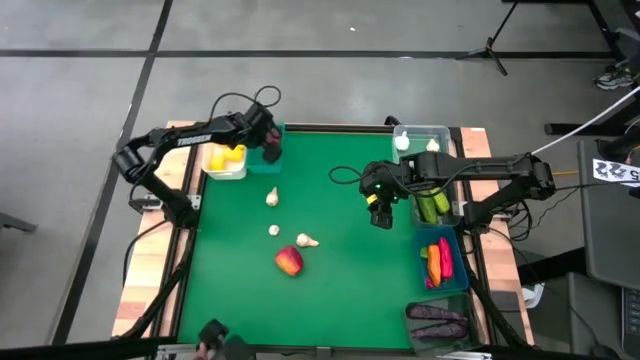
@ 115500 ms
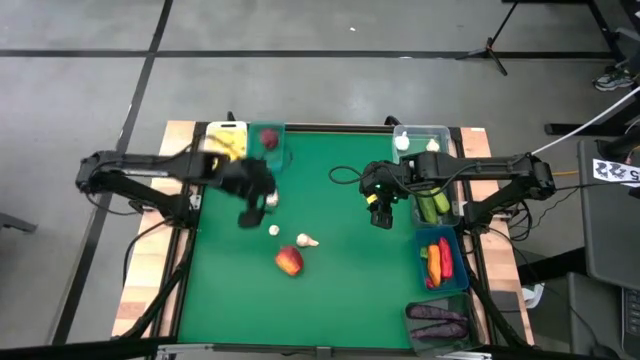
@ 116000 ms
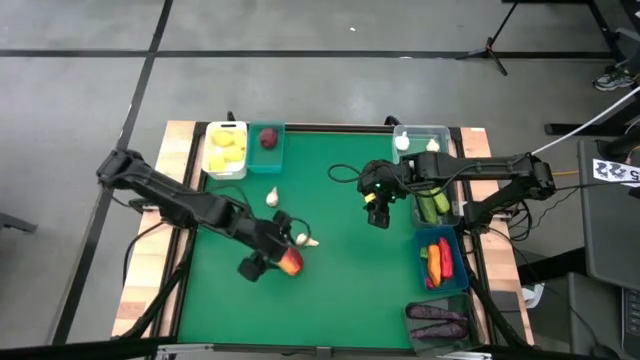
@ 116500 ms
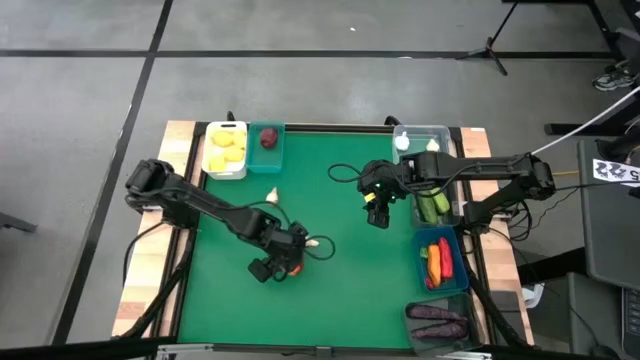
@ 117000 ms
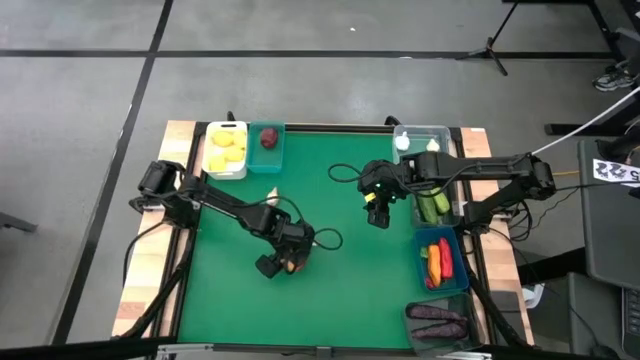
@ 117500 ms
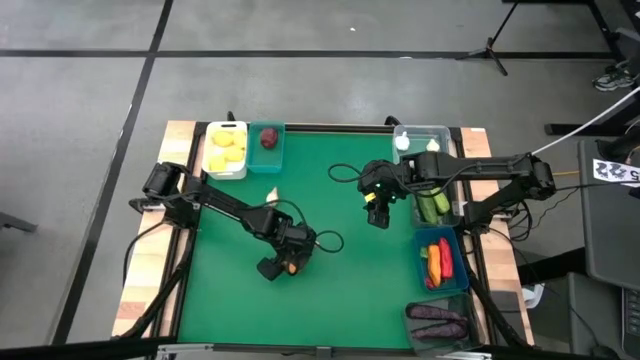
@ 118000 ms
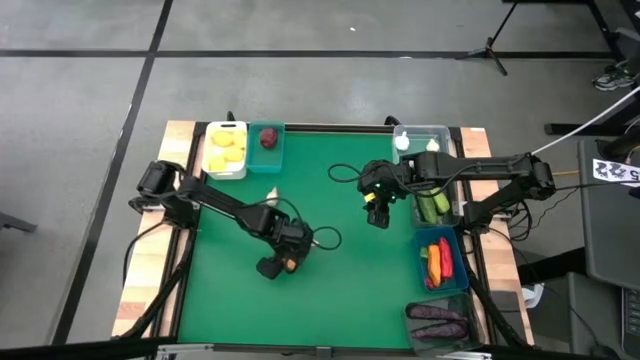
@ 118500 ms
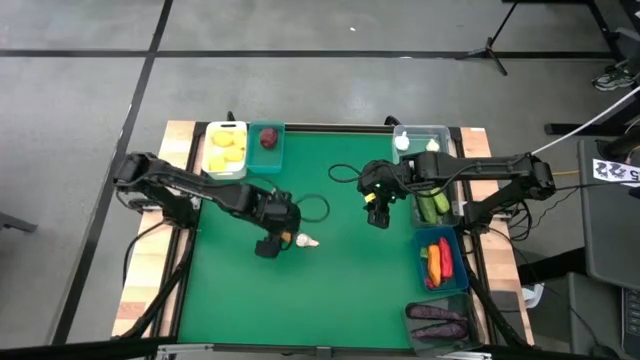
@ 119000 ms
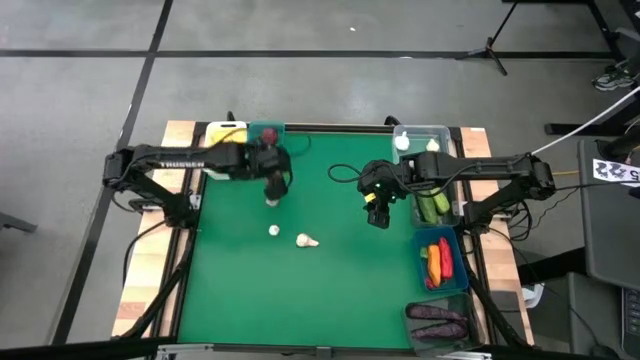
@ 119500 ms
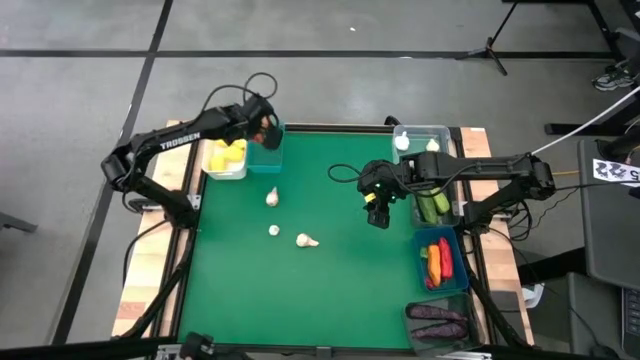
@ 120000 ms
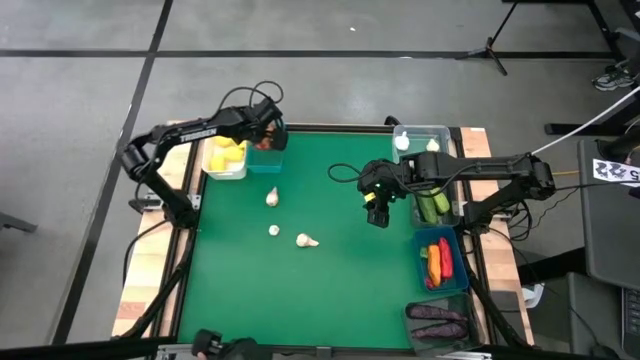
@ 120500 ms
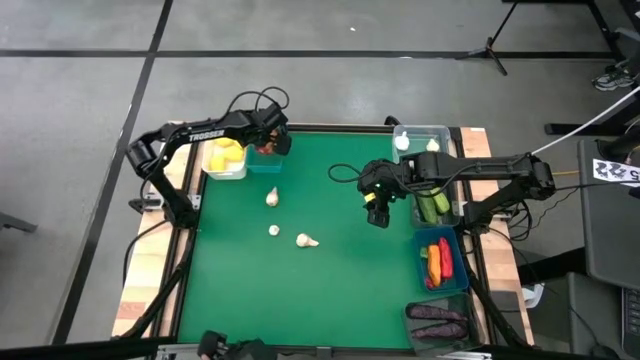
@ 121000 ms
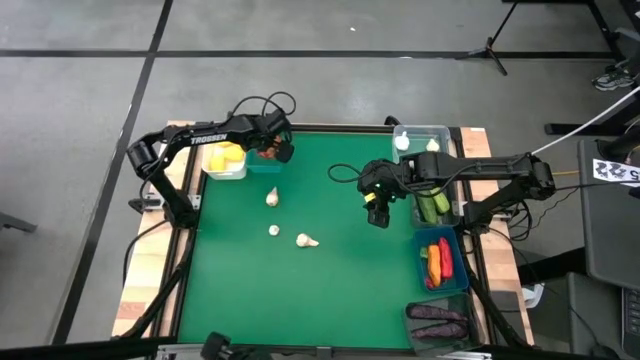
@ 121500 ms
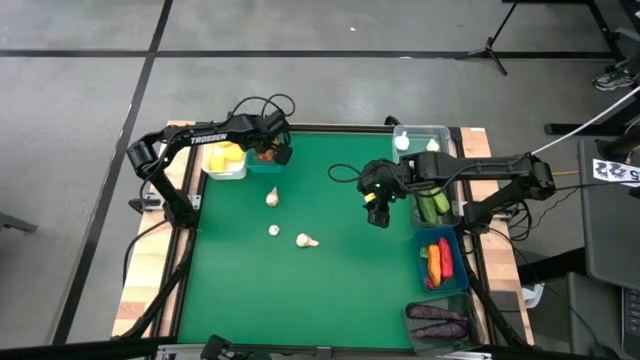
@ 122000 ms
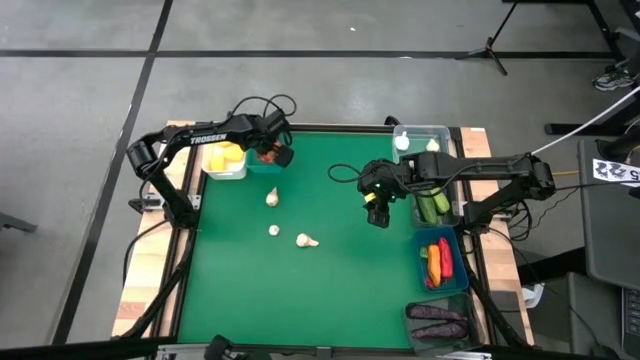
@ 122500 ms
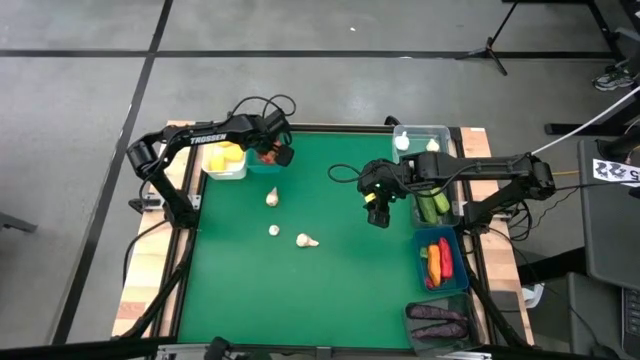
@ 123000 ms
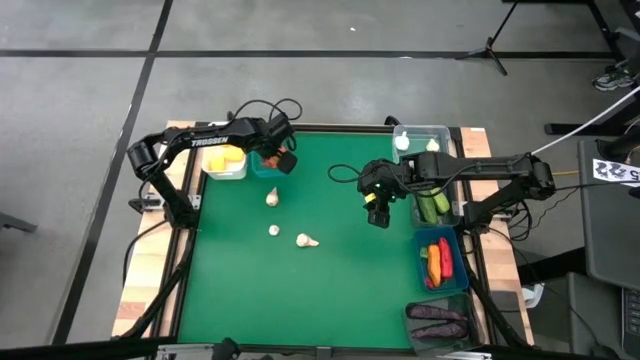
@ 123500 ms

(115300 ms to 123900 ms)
Task: Sort produce into baskets
Put the red apple into the blue bin

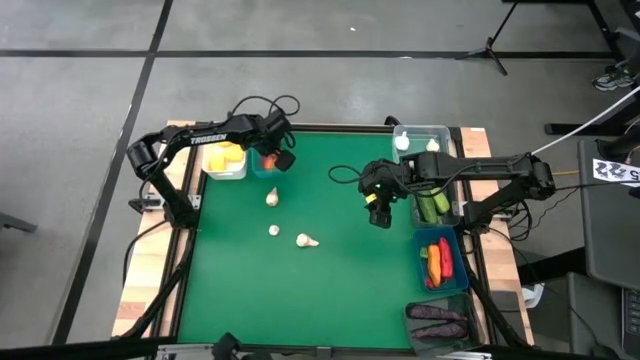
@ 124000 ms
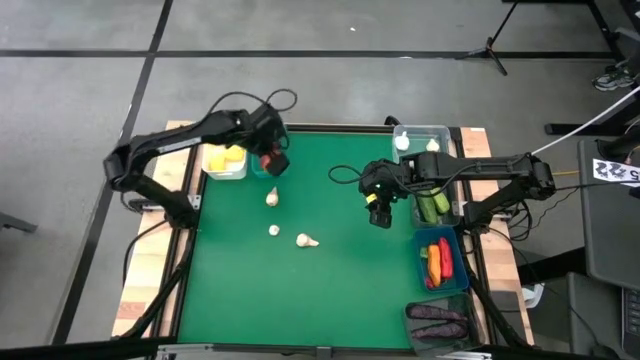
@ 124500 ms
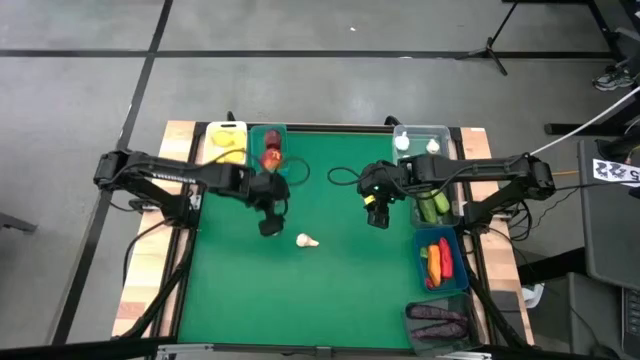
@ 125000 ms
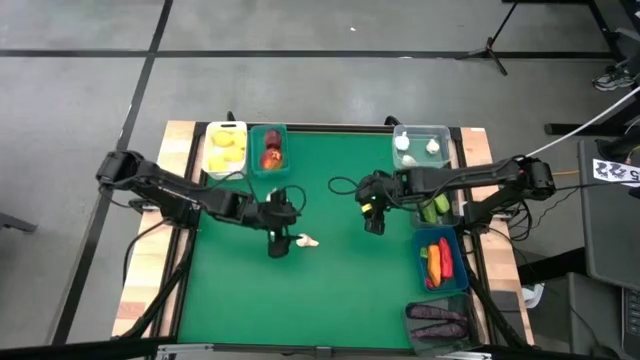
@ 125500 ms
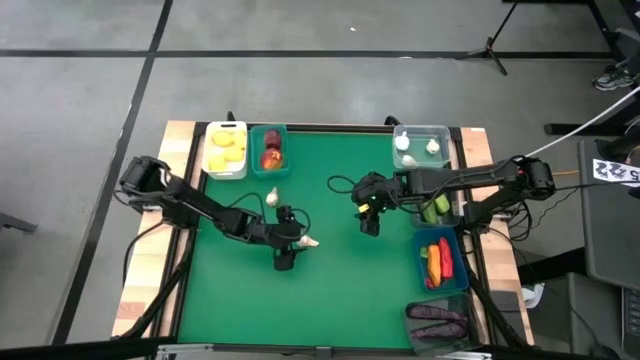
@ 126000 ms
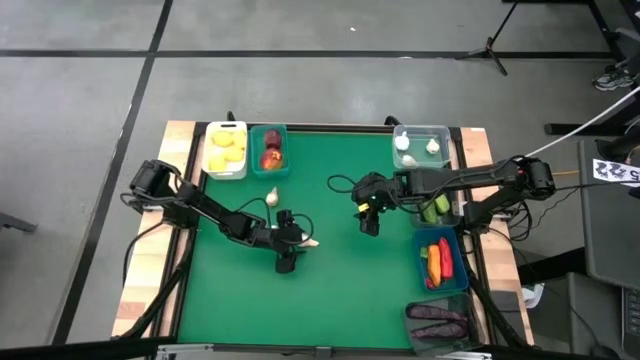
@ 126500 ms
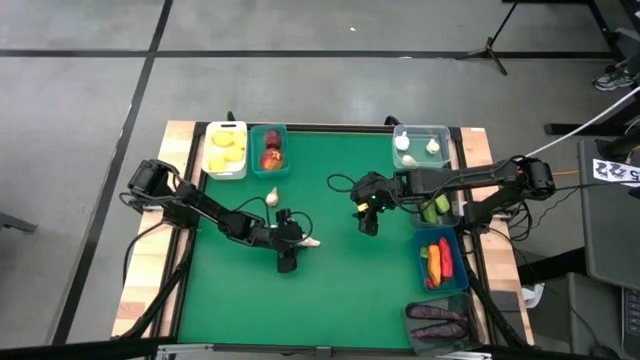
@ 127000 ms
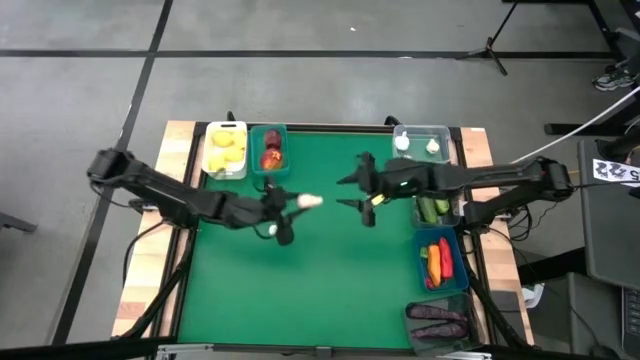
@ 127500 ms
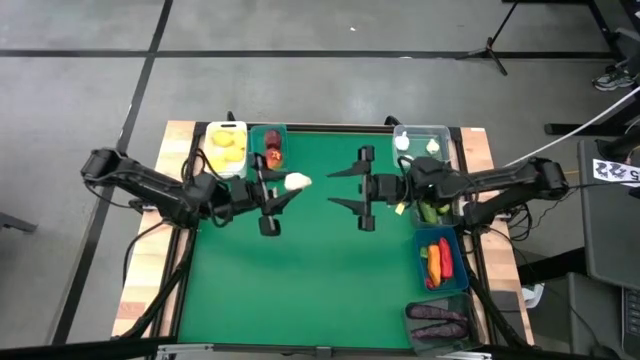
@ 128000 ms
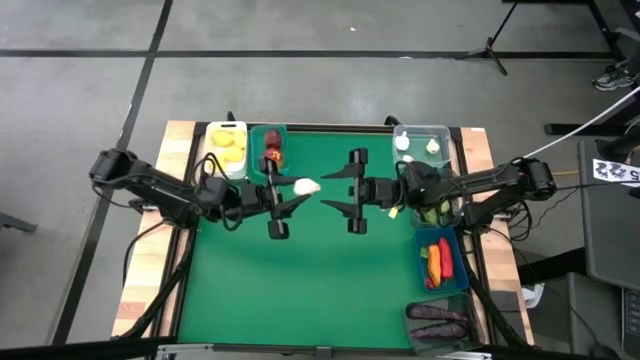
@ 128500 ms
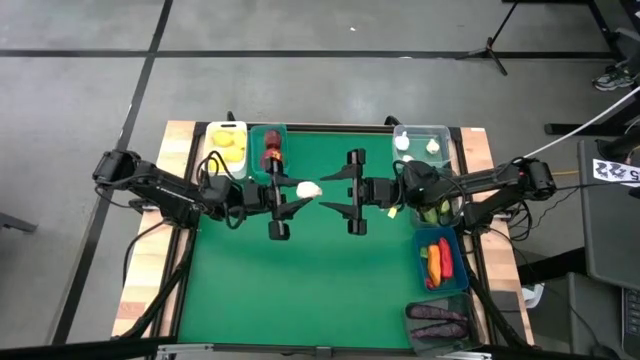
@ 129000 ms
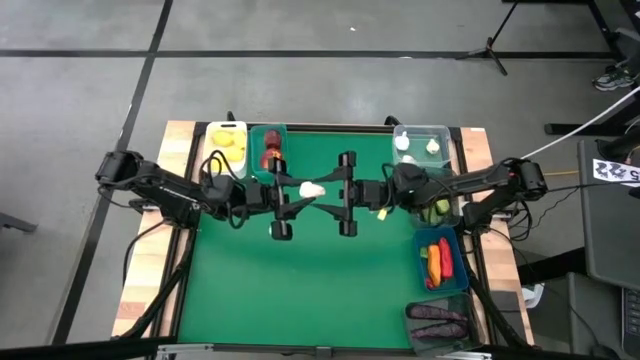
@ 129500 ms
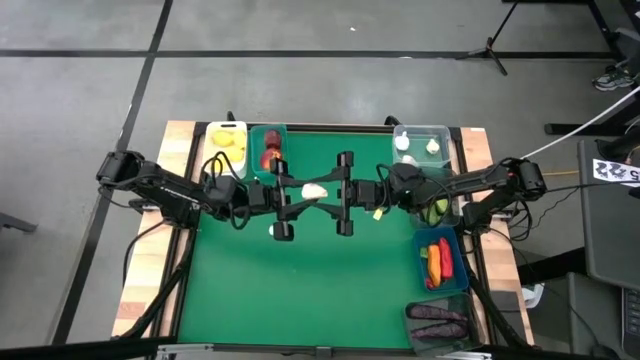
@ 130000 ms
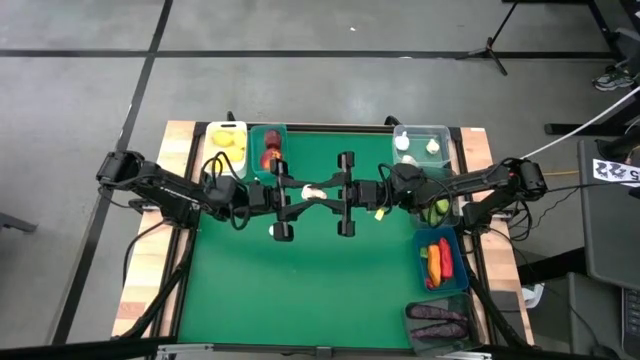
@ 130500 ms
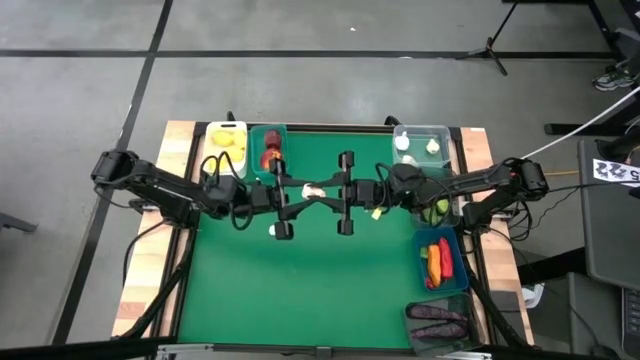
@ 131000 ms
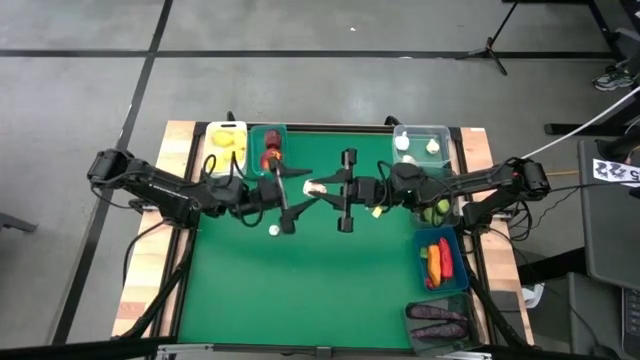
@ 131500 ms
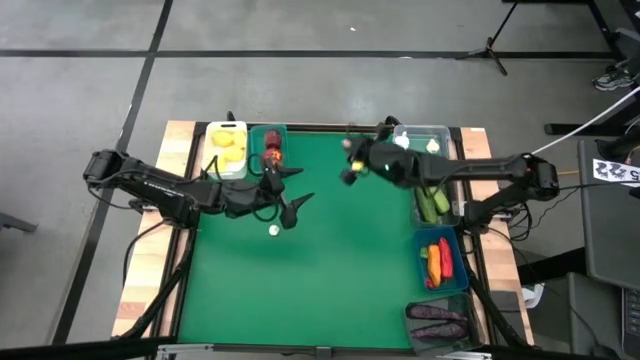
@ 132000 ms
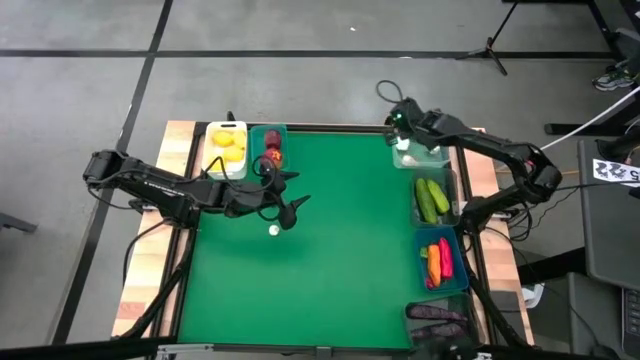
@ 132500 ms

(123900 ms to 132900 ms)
Put the white garlic into the transparent bin

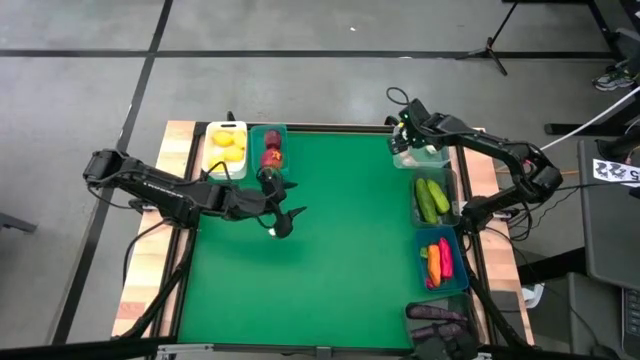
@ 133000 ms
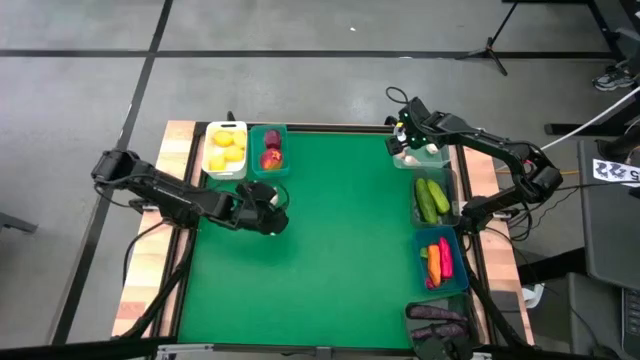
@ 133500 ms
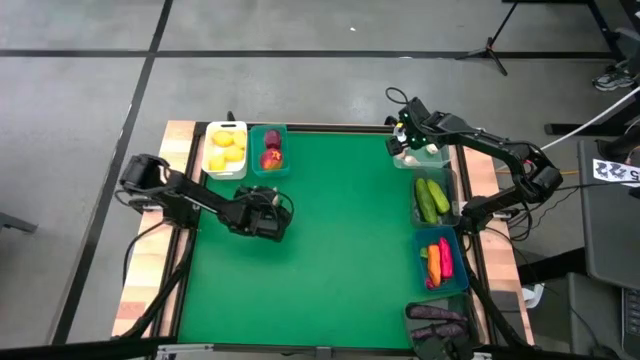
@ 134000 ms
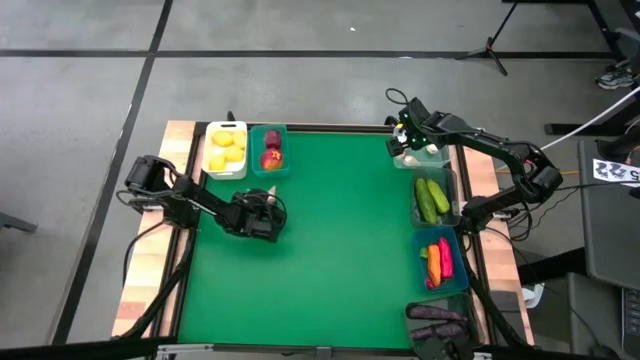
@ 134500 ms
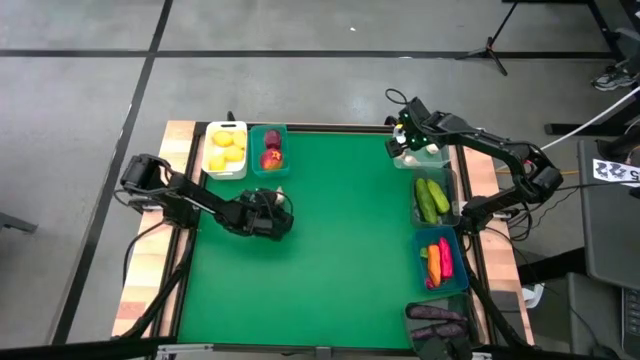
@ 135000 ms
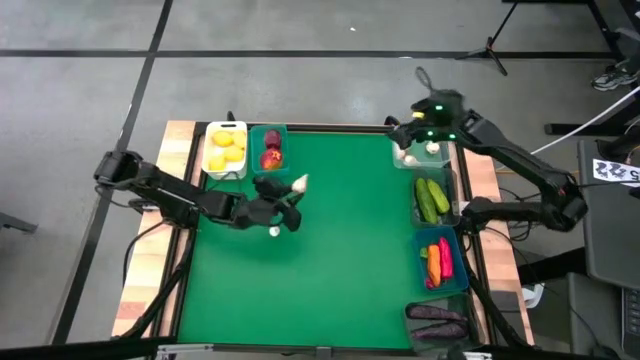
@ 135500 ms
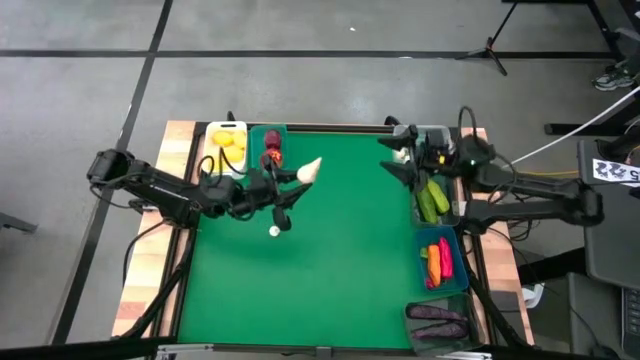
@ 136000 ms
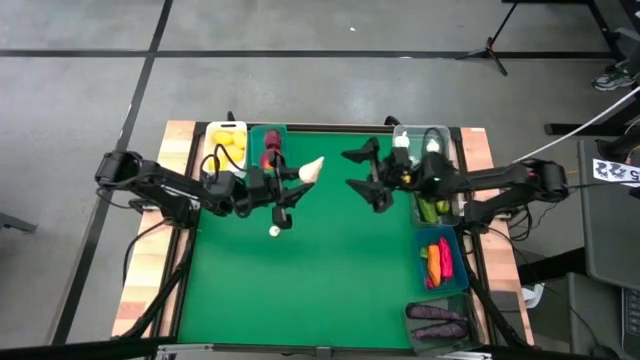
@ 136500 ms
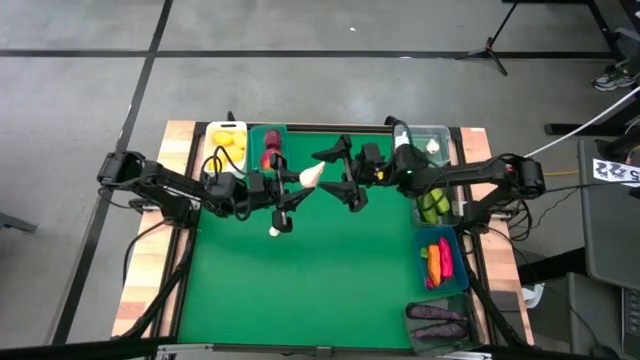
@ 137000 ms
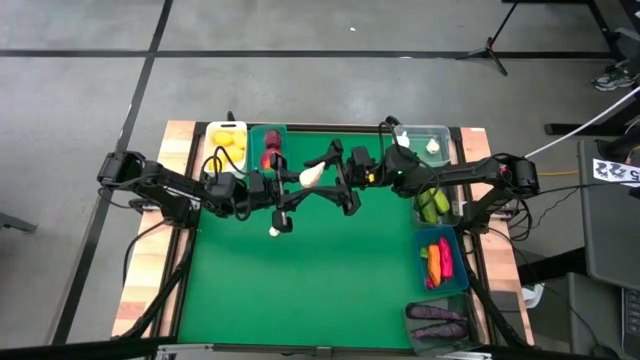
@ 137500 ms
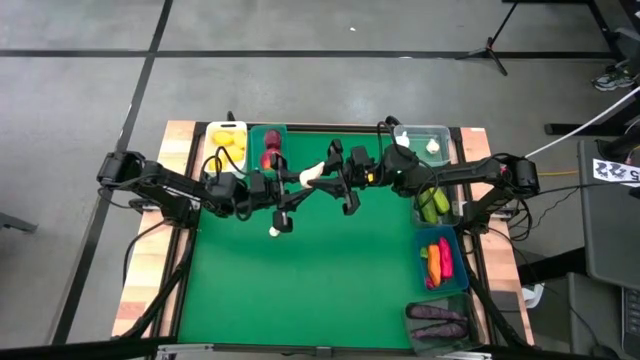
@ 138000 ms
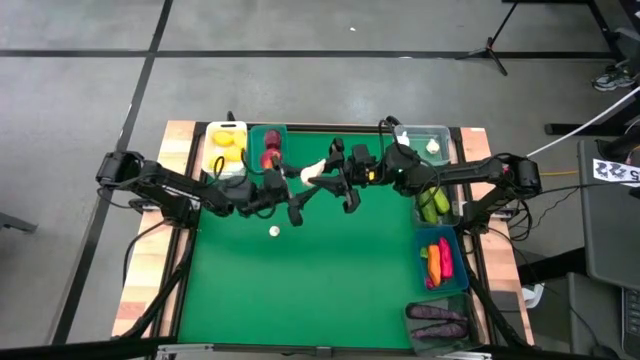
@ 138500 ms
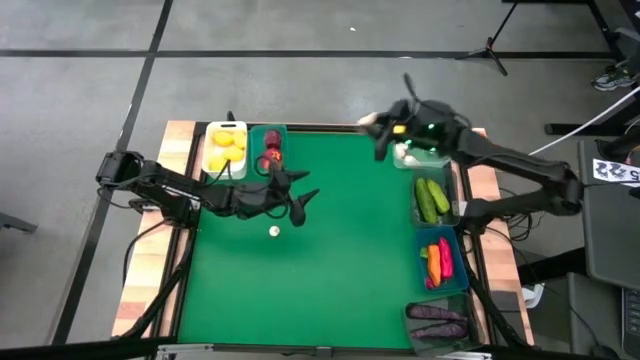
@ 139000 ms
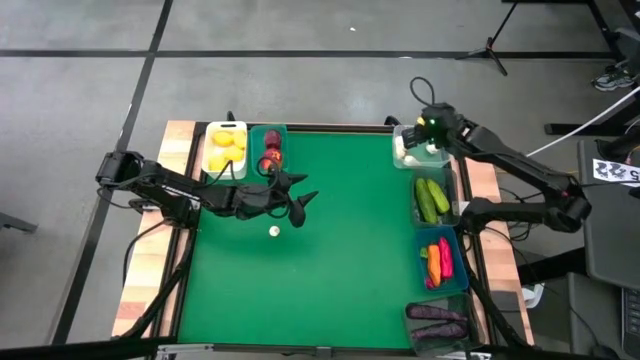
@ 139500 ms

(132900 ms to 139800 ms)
Put the white garlic into the transparent bin
